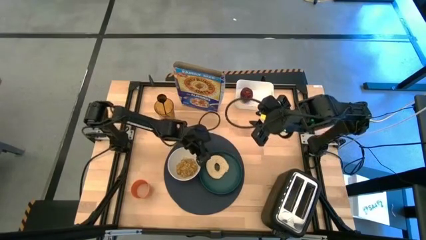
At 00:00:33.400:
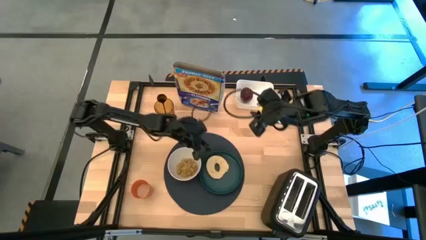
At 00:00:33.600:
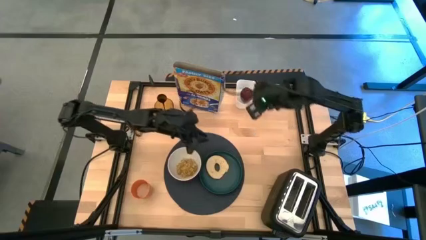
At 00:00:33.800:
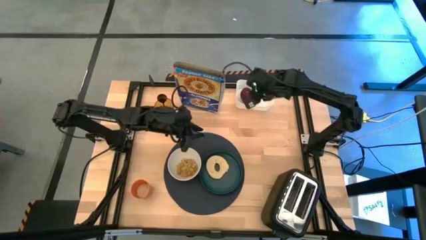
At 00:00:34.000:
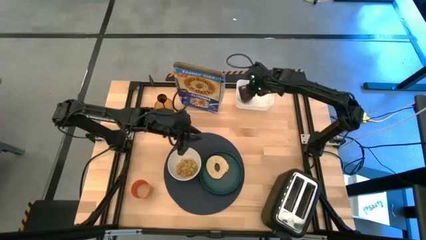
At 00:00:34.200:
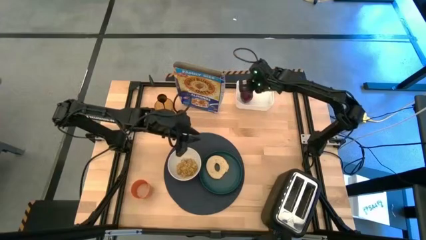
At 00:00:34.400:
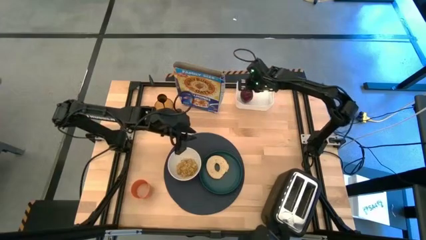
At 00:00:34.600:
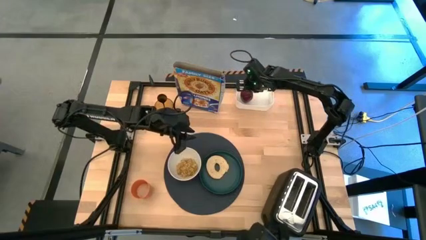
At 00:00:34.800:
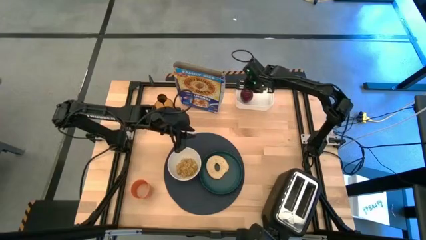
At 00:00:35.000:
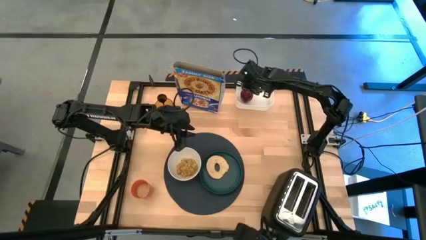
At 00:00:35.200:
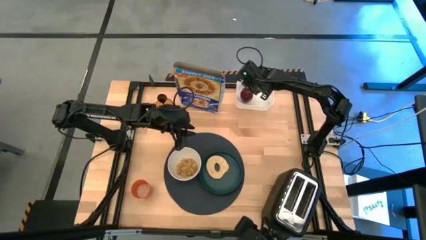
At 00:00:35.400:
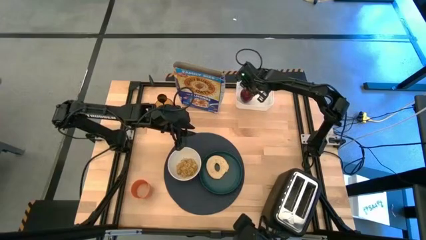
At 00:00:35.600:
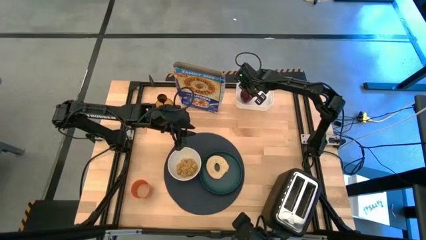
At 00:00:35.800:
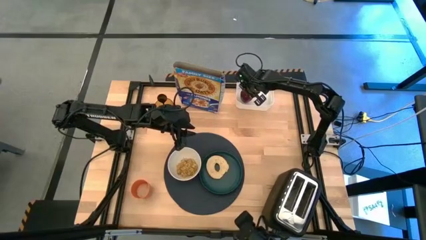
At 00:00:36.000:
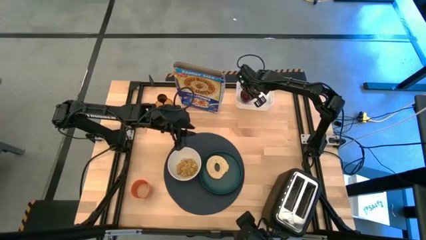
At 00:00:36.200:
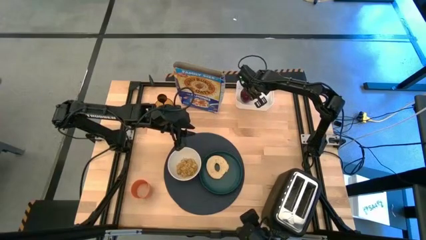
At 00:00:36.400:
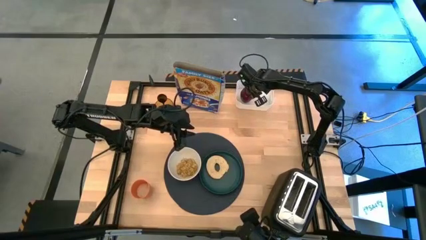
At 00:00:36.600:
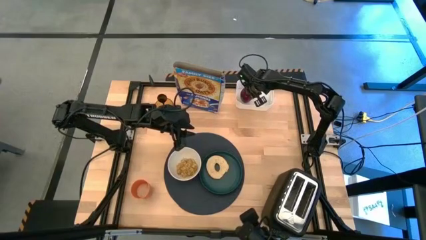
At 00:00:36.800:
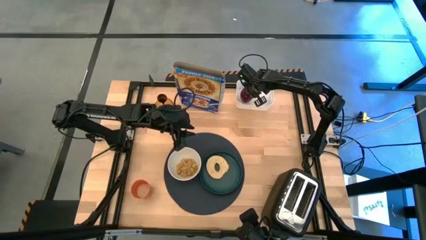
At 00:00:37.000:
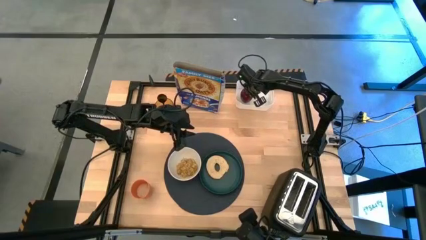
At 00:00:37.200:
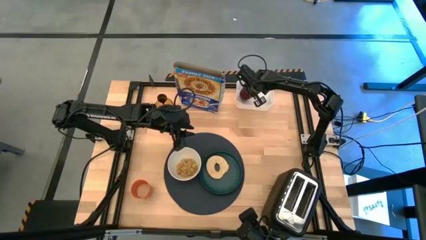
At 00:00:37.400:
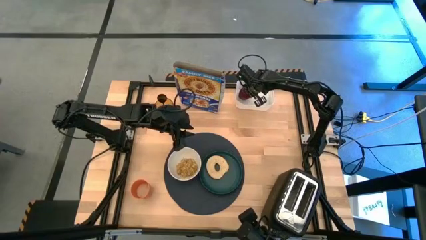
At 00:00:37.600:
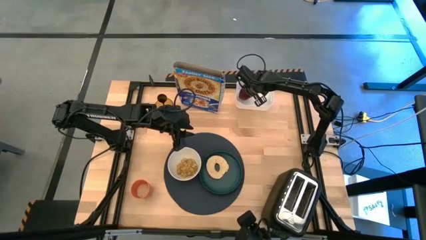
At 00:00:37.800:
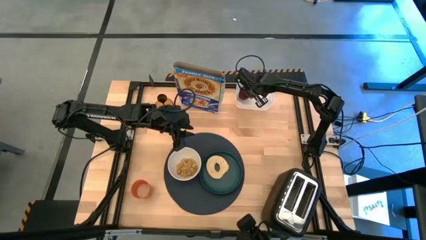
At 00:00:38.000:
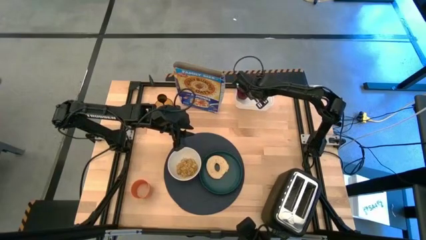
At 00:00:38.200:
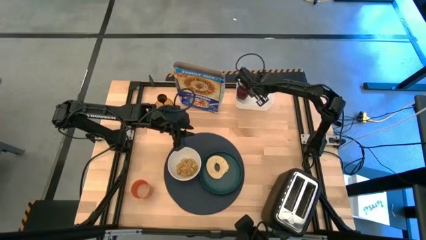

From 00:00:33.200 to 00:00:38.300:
Task: Arrange a breakfast setting
Put the apple on the right side of the blue plate

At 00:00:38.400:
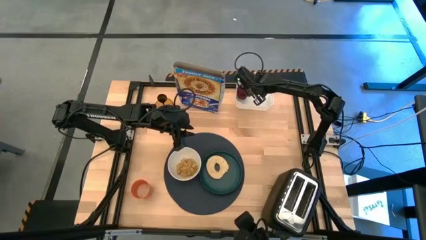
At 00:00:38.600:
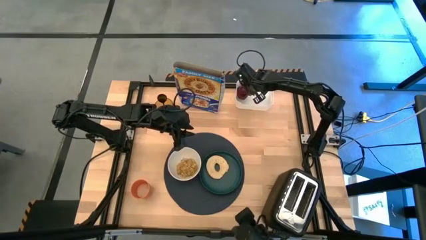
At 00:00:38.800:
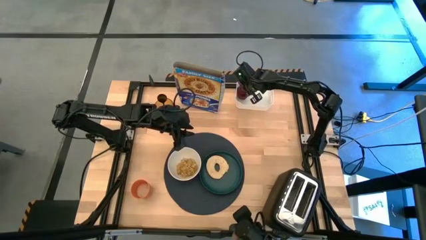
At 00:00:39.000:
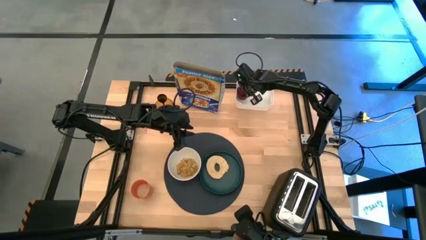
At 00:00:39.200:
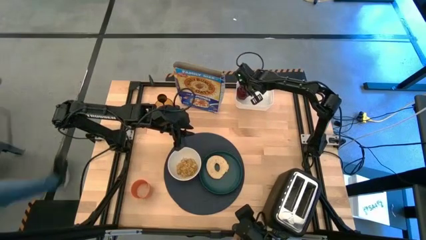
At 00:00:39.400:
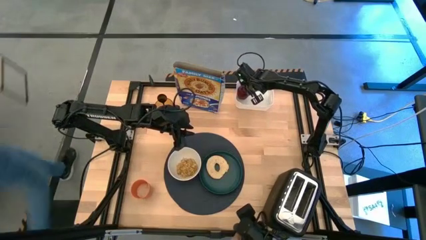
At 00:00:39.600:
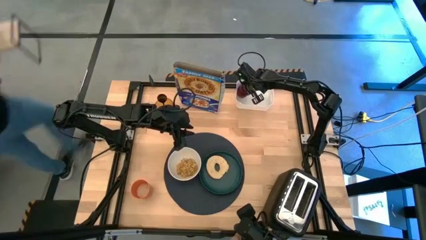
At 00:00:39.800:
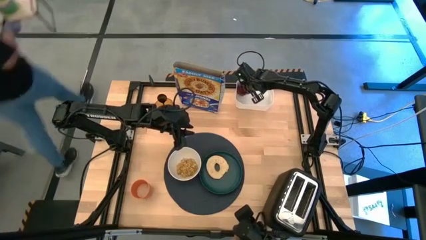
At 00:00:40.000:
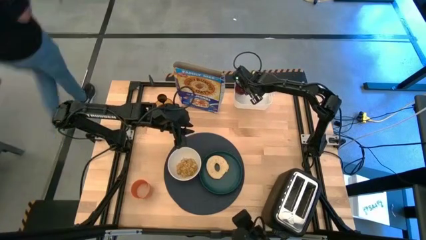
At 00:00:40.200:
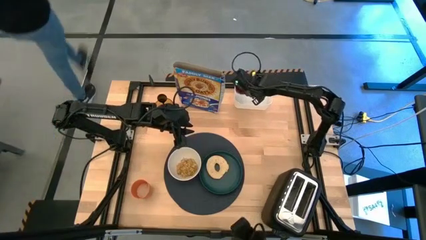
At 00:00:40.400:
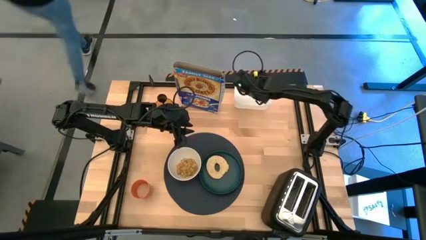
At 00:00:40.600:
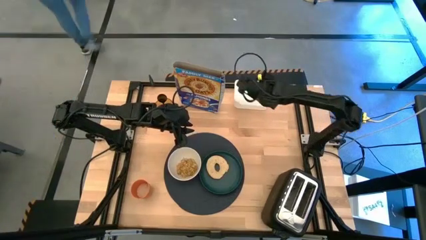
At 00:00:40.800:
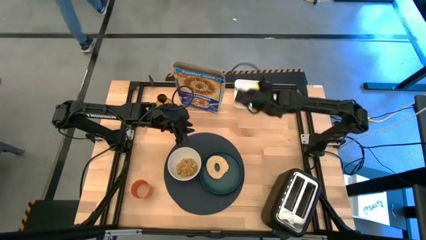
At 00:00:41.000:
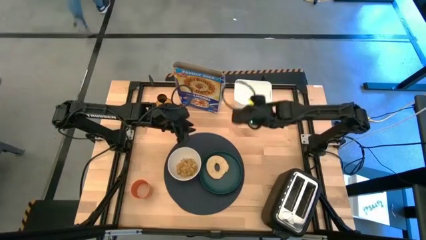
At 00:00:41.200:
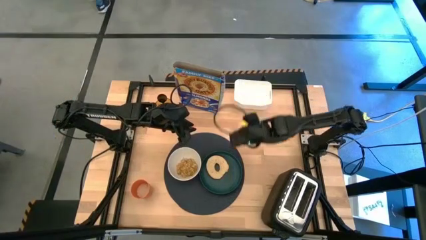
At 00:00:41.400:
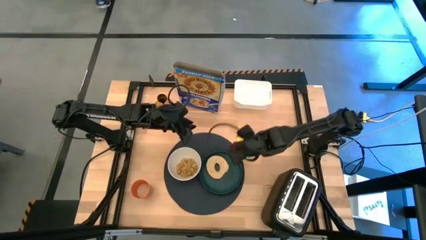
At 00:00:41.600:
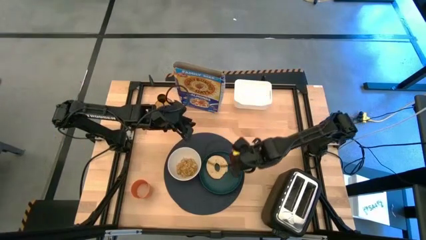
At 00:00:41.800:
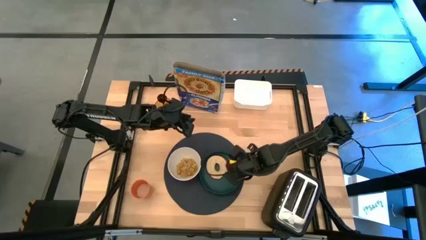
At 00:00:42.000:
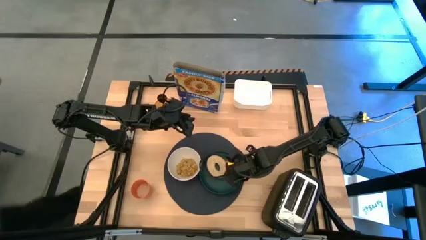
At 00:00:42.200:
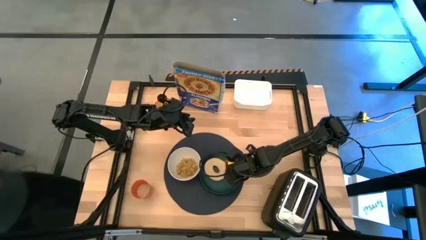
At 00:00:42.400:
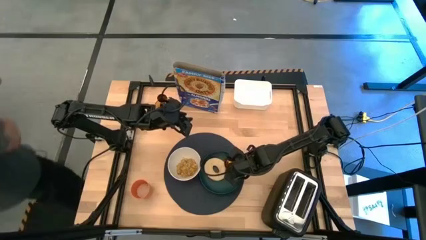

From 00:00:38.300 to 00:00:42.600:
Put the apple on the right side of the blue plate

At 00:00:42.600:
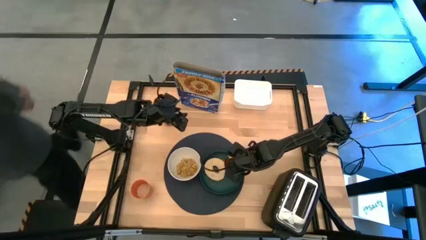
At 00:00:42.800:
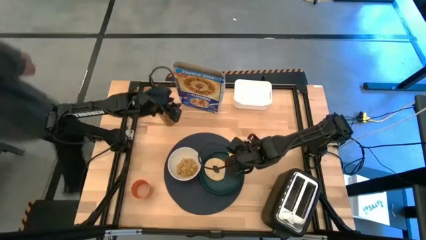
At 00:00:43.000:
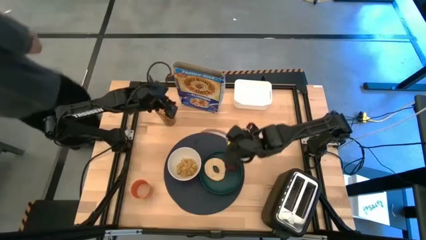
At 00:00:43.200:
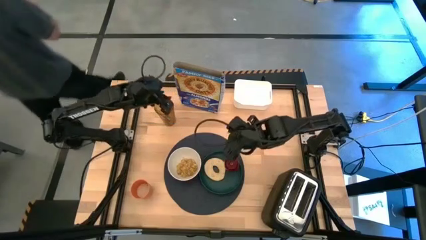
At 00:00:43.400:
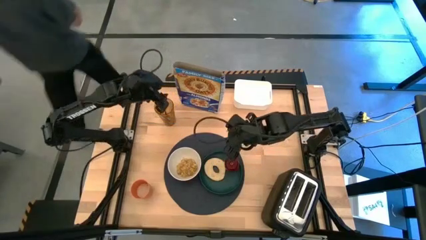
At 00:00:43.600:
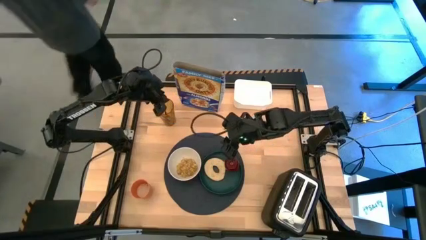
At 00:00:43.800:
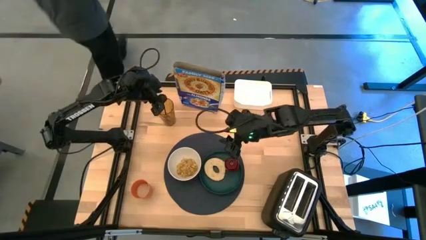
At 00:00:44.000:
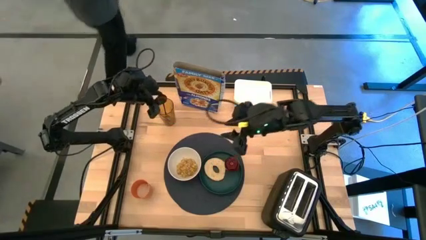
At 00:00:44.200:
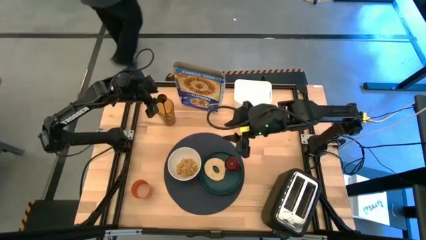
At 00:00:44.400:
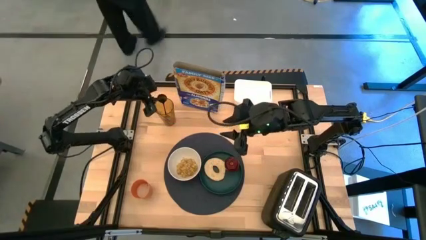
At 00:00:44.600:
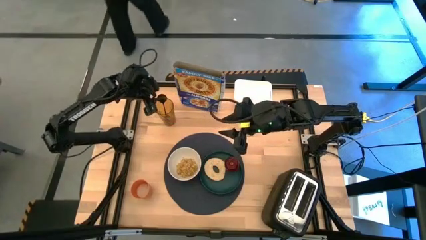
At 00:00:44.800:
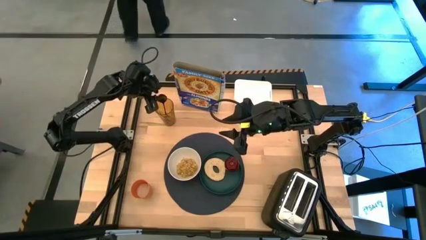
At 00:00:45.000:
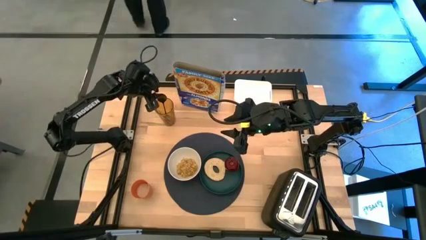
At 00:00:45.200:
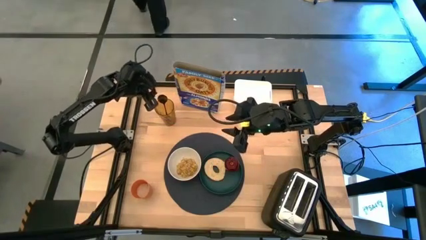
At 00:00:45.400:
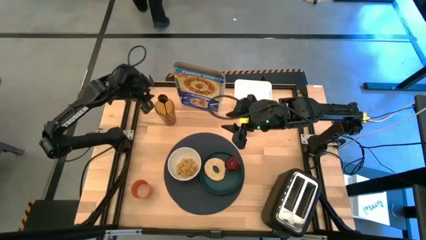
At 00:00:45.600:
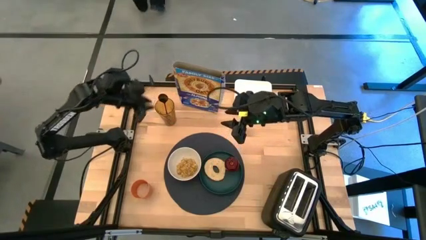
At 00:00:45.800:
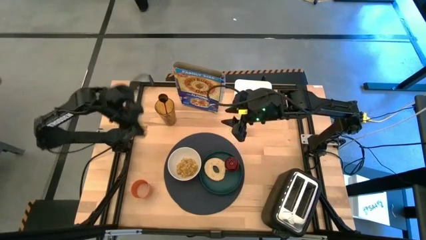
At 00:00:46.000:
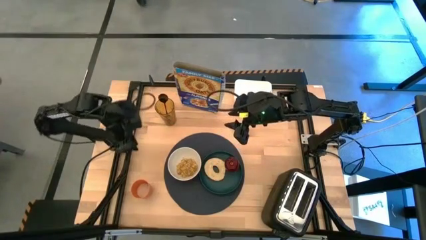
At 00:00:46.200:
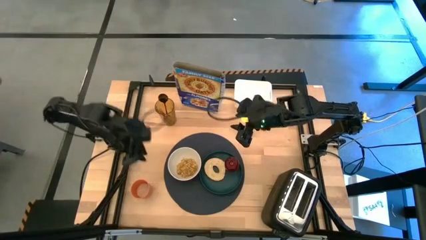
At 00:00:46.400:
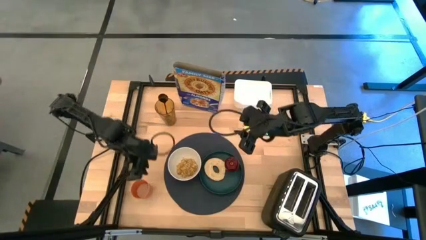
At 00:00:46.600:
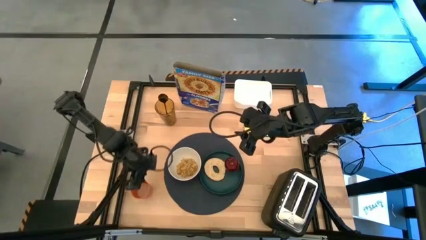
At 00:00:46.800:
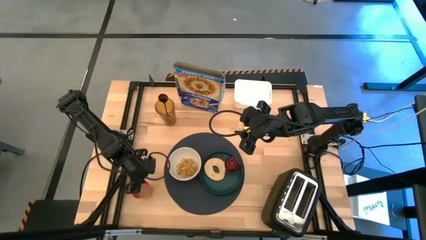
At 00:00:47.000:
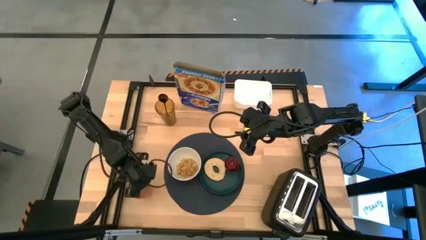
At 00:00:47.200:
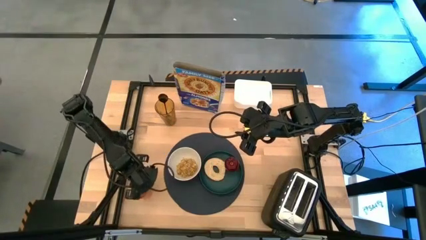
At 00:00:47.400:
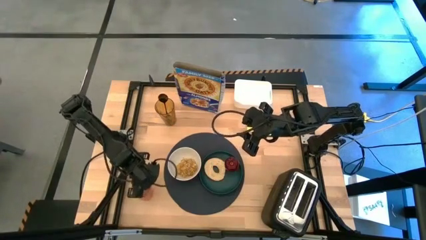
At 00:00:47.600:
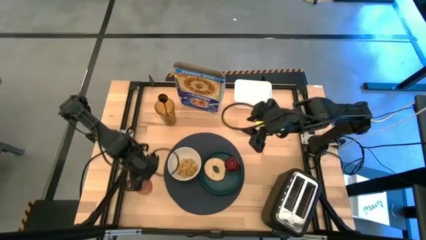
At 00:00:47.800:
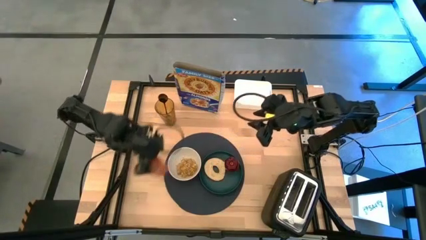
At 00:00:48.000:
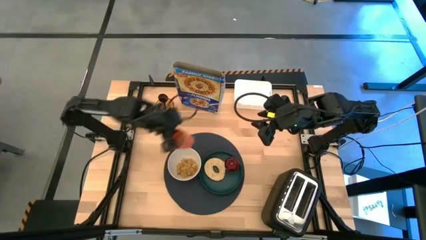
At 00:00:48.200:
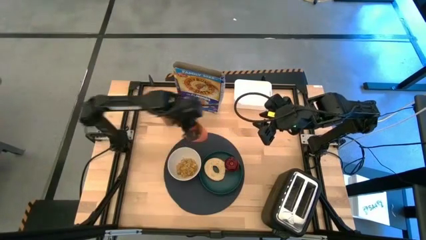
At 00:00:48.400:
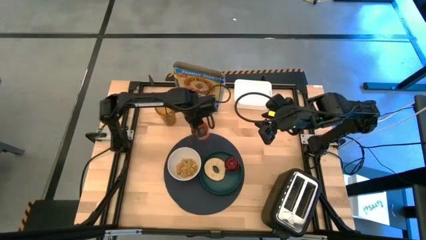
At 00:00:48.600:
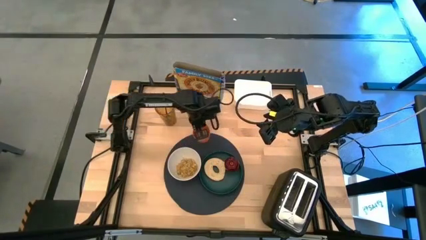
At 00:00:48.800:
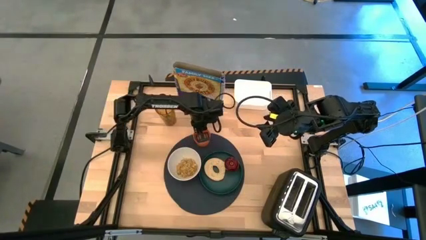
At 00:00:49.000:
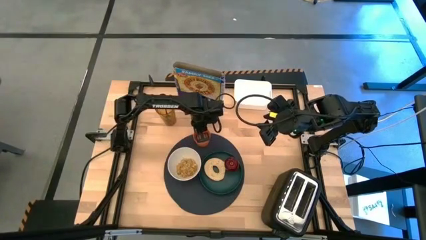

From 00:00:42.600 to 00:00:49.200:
Put the orange cup on the top middle of the blue table mat

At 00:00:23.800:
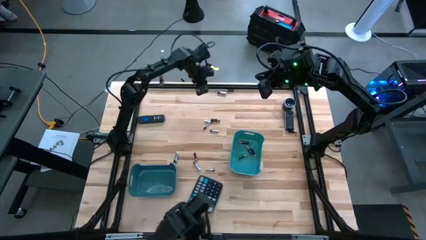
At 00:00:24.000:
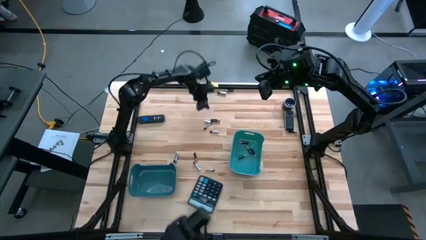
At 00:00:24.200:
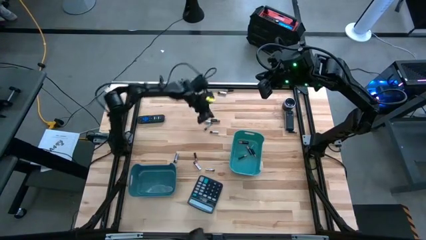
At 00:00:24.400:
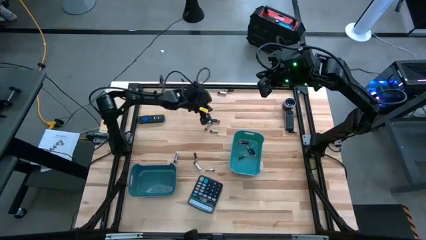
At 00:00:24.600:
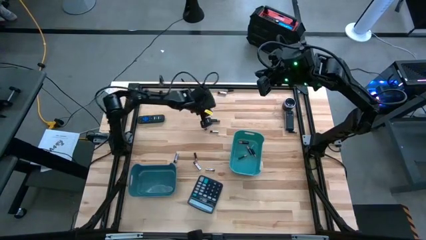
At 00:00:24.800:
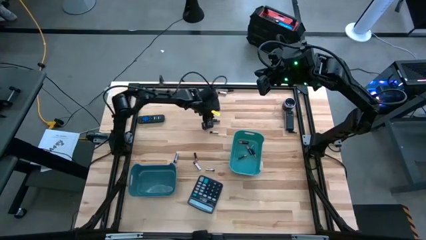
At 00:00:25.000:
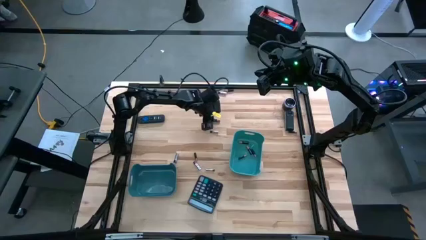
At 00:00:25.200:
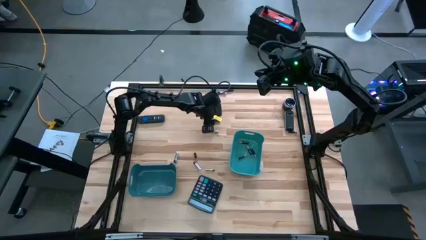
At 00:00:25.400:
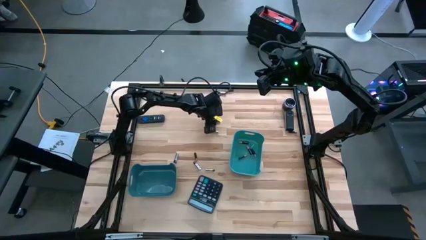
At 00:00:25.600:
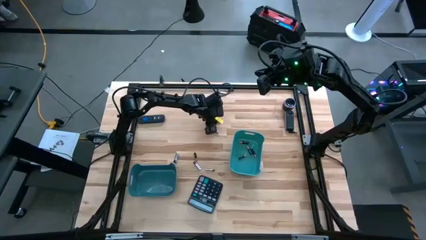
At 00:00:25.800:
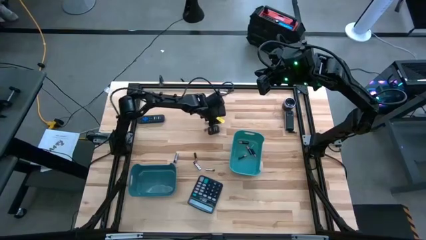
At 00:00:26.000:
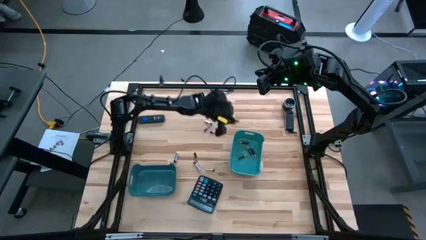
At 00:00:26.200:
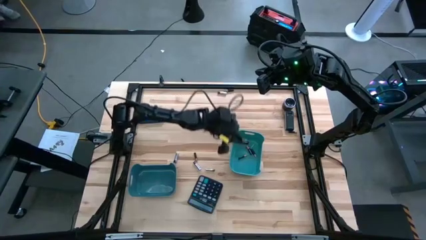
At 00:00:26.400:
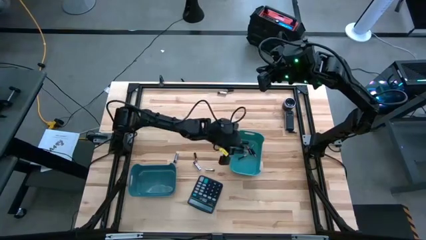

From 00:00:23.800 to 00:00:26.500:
Task: Sort batteries
Put the black battery into the dark green bin
